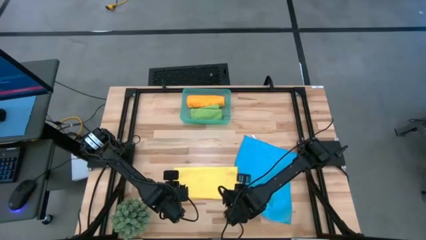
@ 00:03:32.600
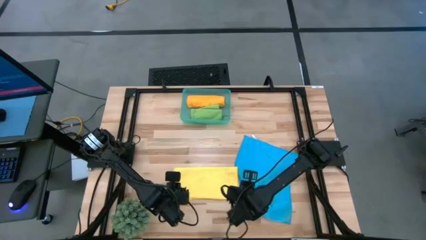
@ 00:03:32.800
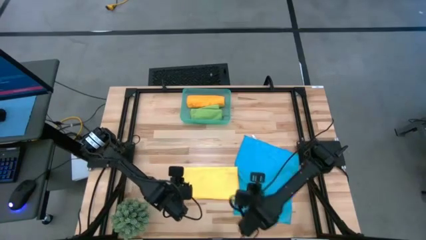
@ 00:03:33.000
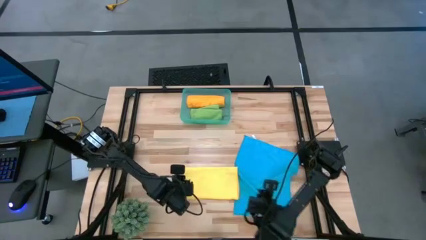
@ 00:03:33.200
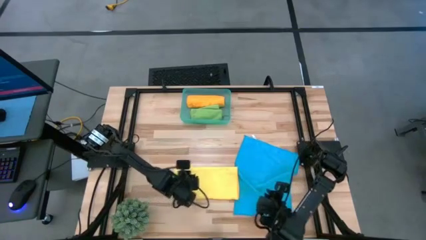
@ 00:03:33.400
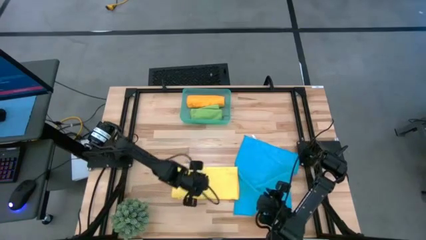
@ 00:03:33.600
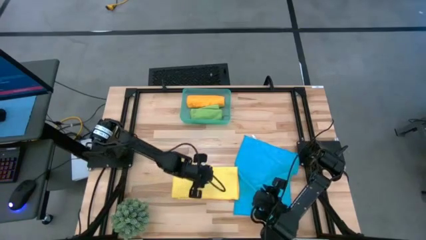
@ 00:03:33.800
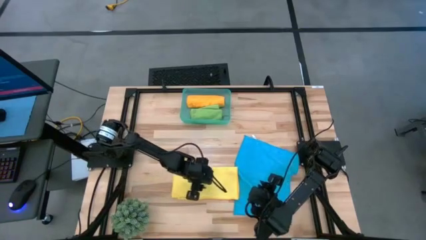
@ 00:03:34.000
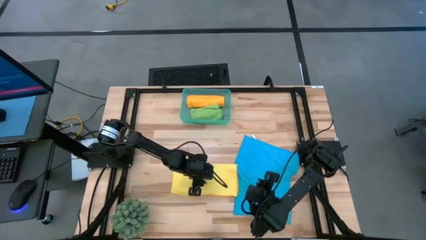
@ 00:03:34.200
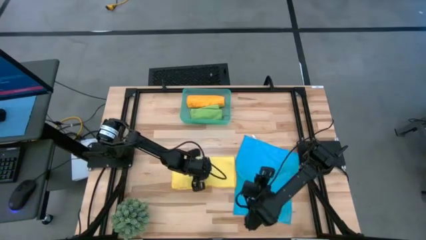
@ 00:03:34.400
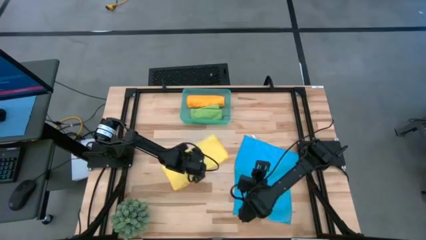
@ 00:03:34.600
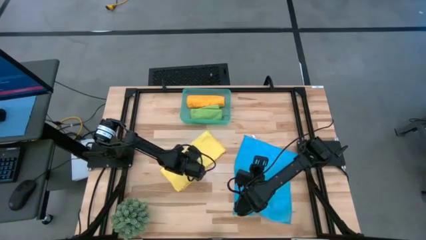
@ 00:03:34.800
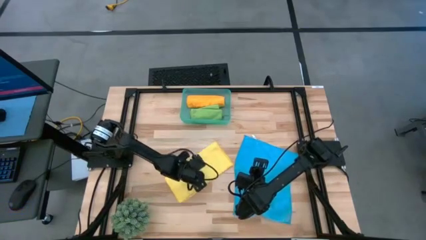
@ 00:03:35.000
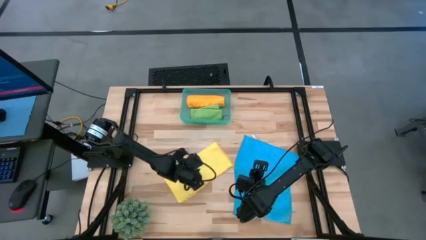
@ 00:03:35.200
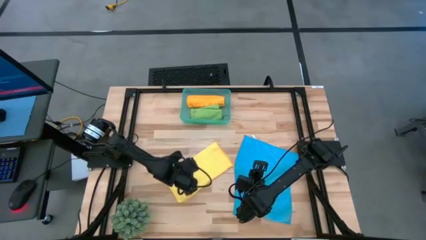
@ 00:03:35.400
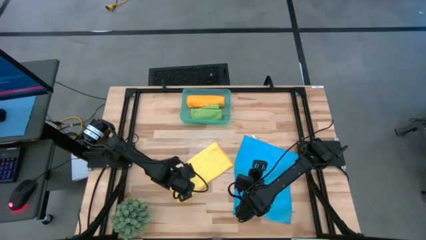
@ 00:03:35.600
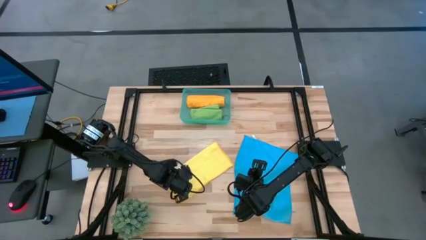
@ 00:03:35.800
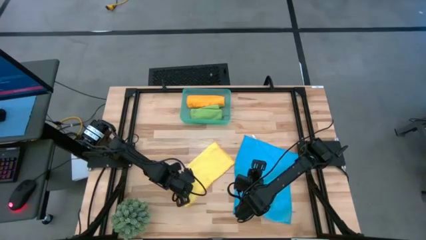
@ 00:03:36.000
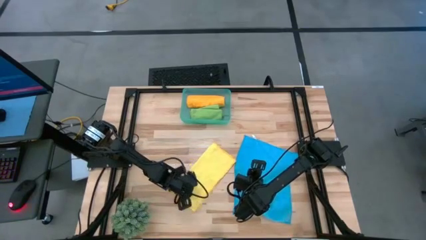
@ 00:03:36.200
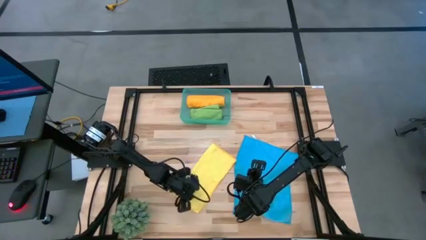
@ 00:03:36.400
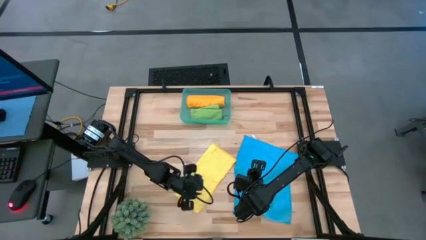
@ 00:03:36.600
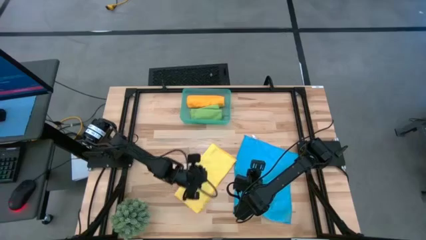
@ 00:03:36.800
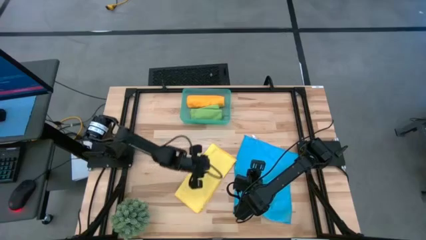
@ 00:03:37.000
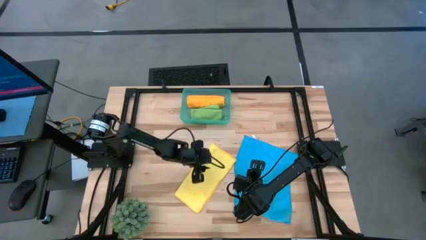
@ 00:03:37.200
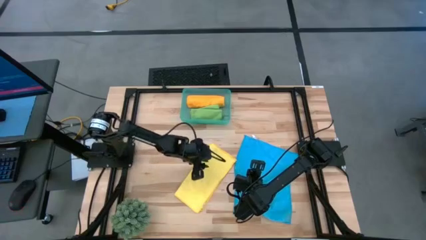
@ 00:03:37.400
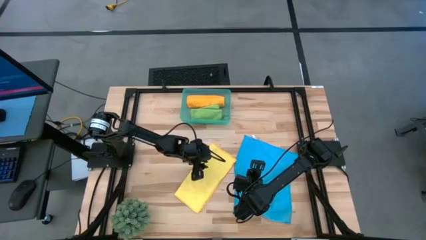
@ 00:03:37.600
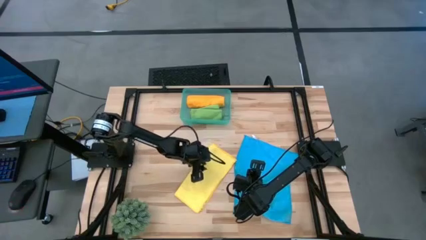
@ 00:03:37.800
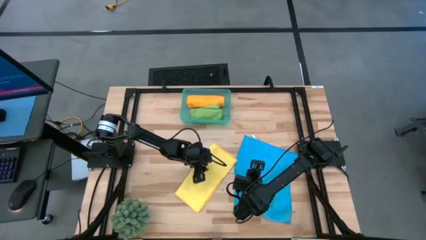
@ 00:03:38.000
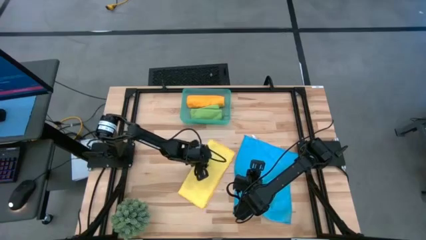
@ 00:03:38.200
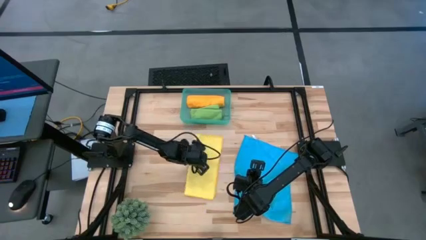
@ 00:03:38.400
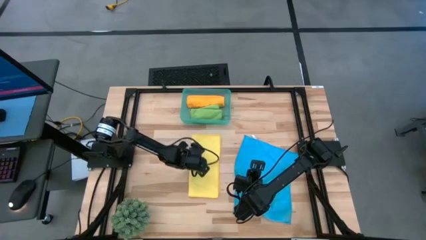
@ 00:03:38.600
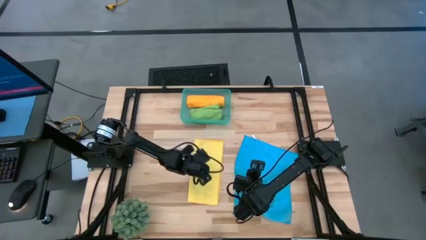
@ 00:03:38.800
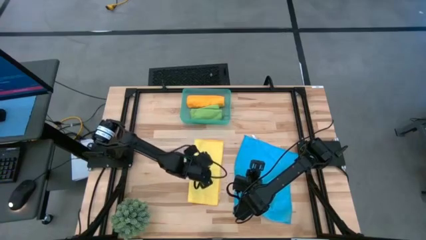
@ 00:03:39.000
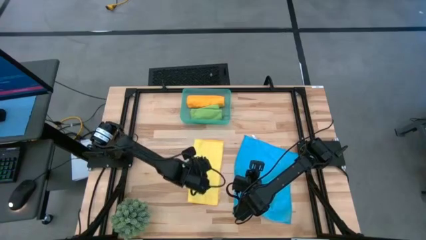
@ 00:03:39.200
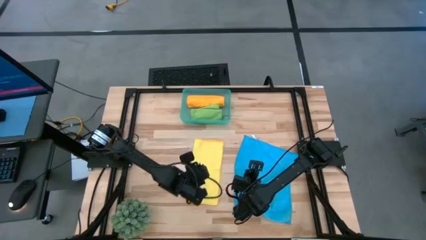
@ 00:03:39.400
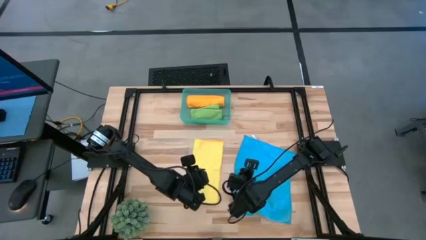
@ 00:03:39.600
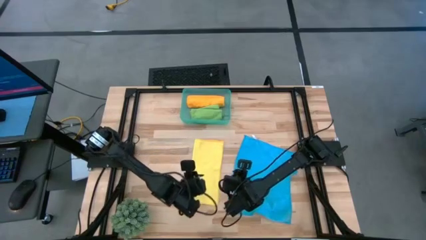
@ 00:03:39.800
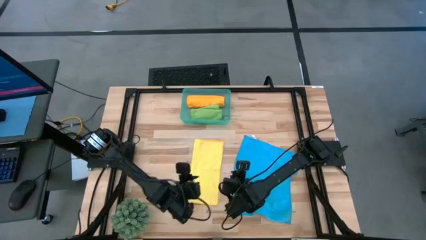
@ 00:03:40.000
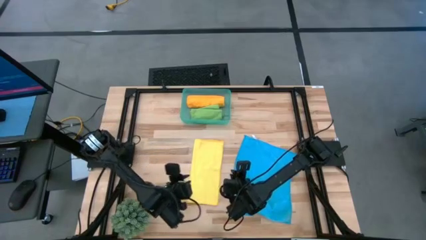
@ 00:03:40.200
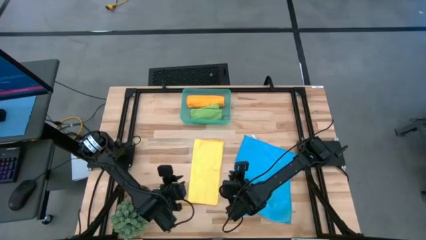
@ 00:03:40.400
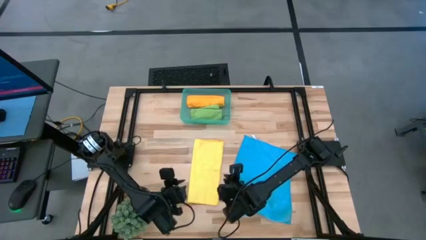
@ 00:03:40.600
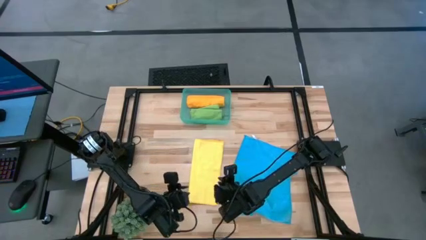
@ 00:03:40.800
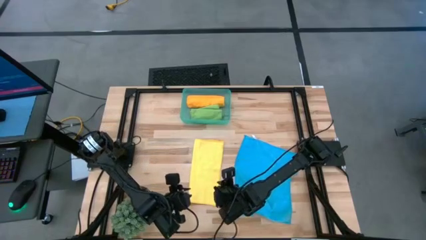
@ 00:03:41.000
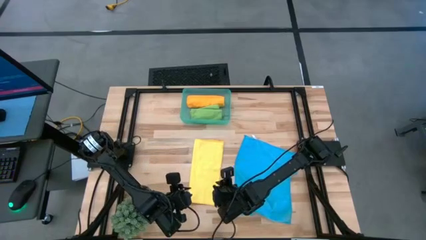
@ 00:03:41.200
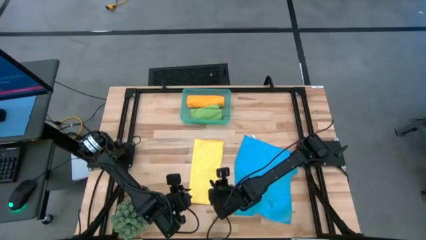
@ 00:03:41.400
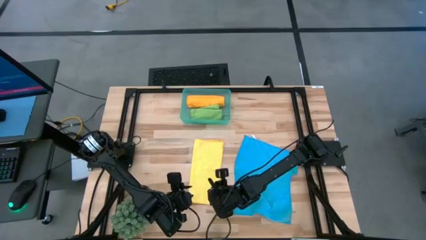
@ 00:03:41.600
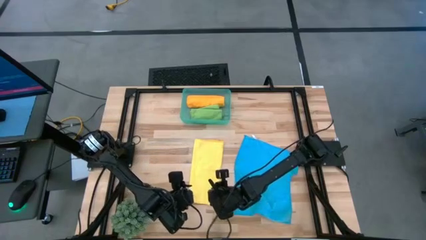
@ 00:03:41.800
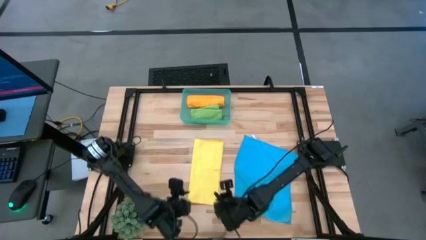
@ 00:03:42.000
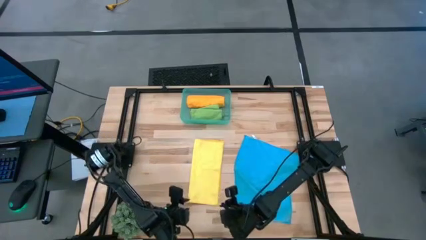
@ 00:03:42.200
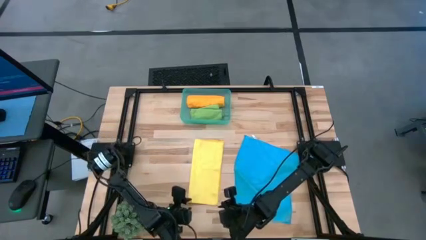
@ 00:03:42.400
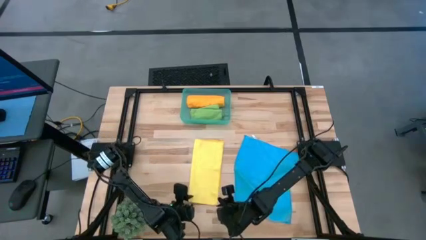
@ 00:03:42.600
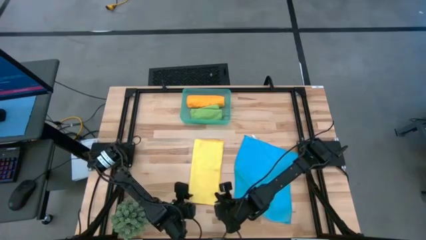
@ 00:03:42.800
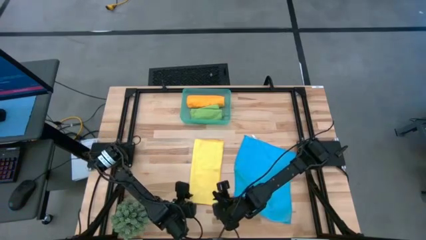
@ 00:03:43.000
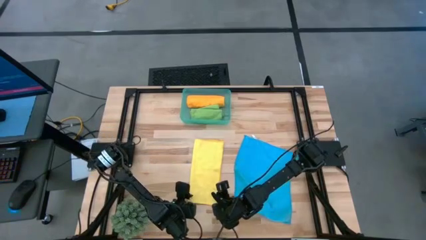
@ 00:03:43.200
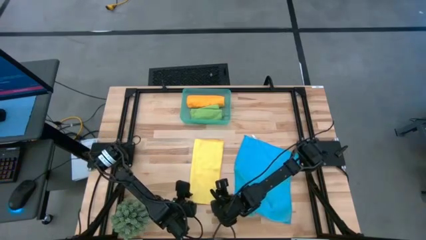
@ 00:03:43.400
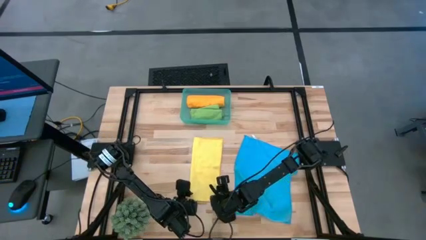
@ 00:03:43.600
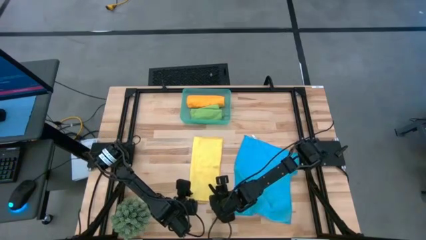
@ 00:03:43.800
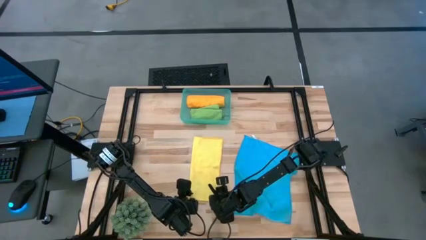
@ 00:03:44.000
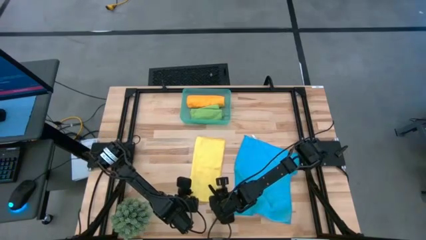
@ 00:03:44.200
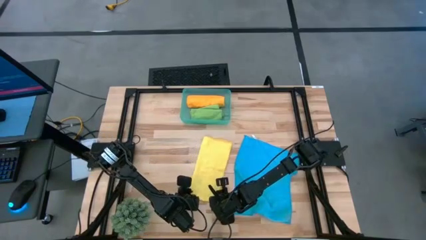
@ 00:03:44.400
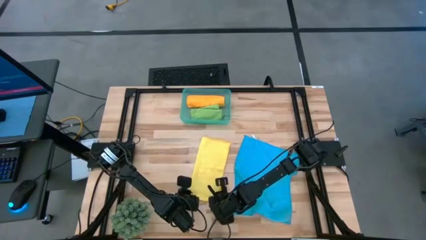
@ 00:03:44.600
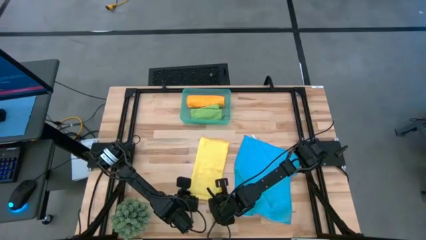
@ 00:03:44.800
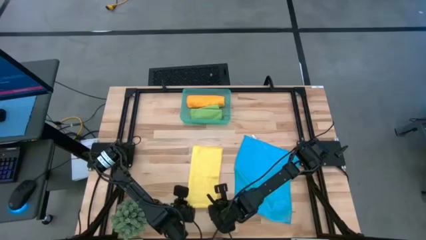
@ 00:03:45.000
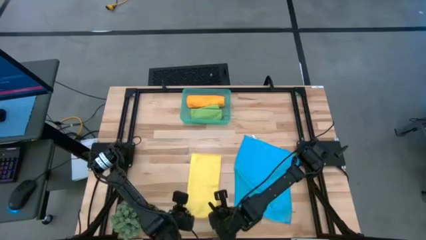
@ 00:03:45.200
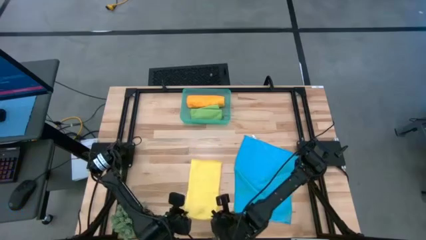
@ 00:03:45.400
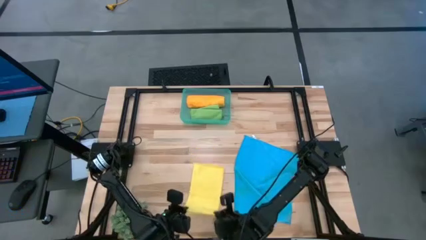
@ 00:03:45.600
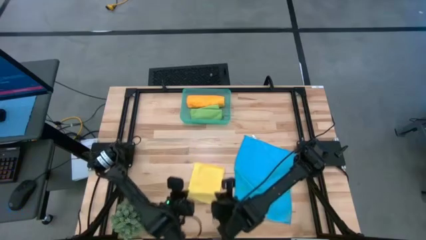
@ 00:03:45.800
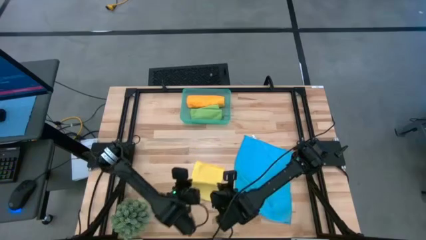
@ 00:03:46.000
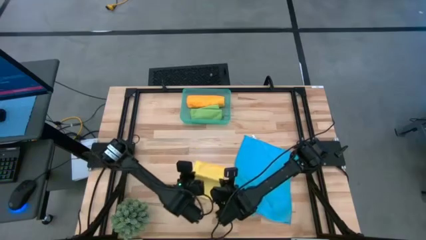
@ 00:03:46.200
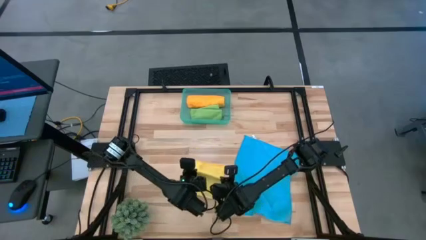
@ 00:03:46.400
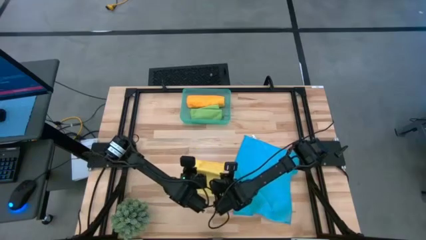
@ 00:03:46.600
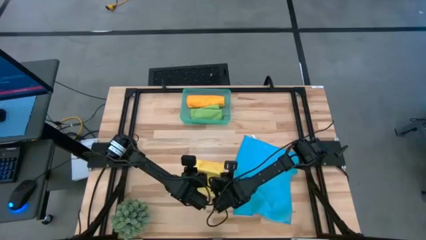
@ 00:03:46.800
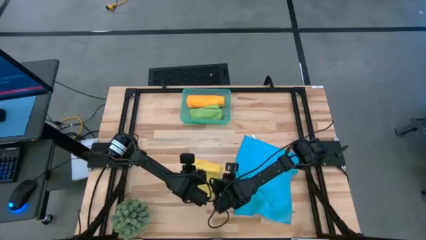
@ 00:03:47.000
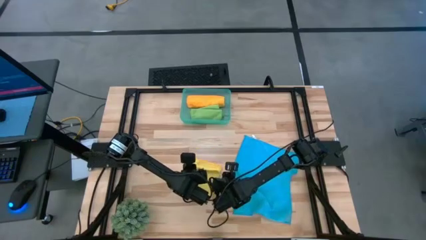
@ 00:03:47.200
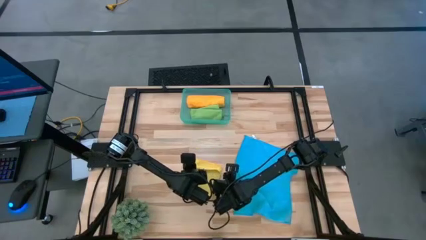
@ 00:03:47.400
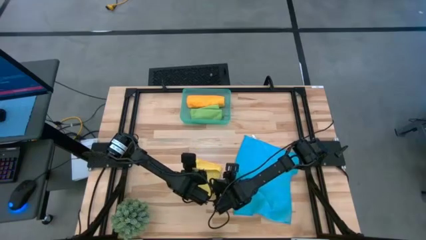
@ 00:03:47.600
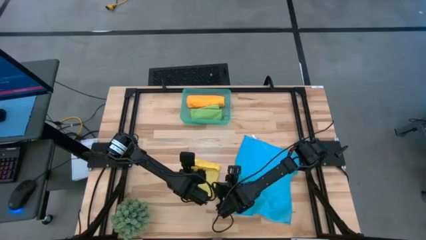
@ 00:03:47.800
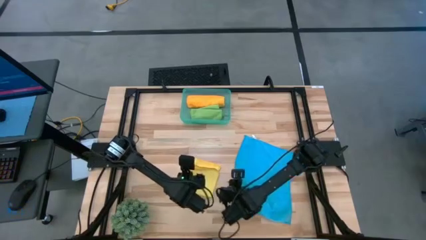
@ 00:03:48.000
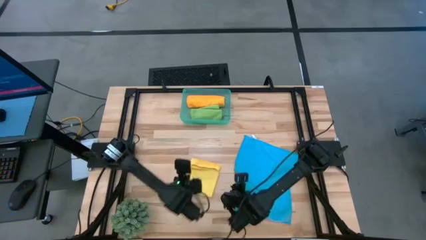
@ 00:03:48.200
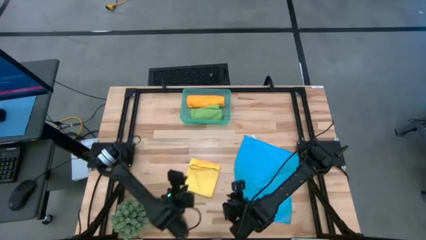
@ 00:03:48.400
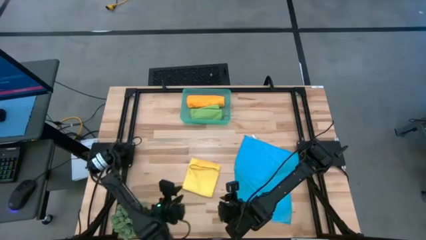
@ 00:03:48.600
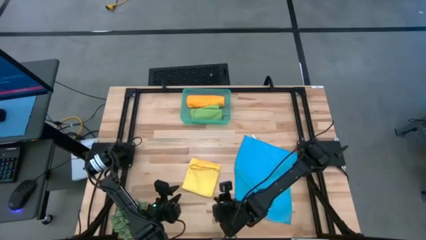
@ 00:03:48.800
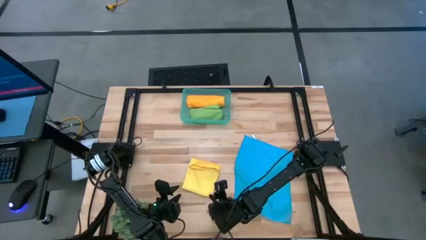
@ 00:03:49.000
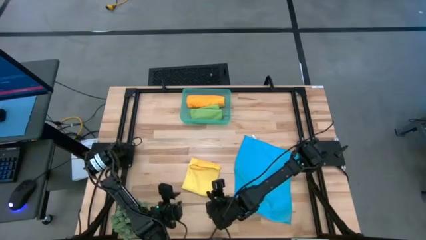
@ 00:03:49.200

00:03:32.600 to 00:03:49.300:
Task: Roll microfiber towels into tight, uniform cylinder then place into a basket
Fold the yellow towel
